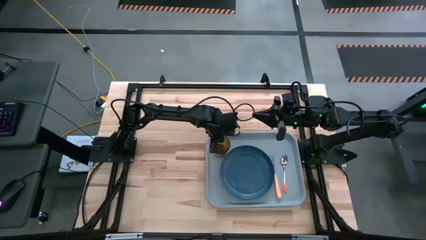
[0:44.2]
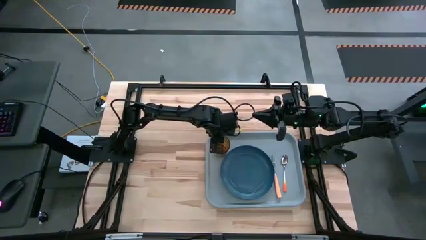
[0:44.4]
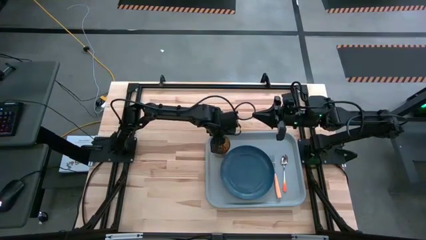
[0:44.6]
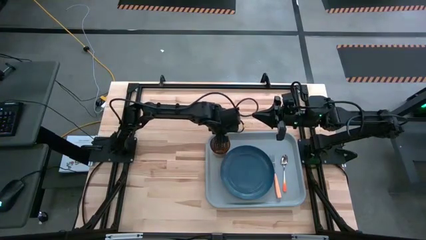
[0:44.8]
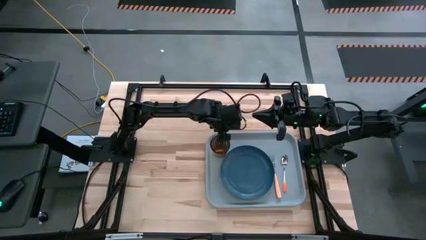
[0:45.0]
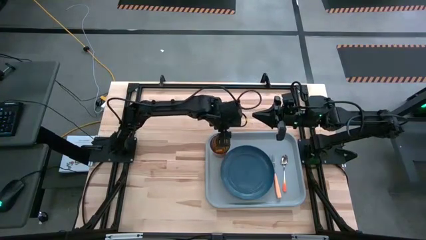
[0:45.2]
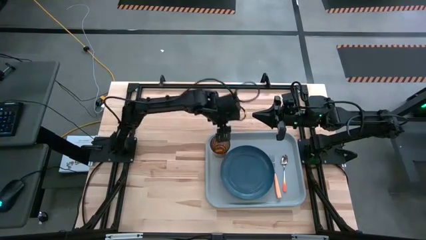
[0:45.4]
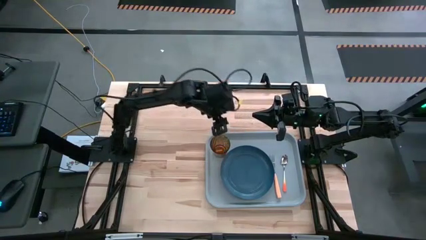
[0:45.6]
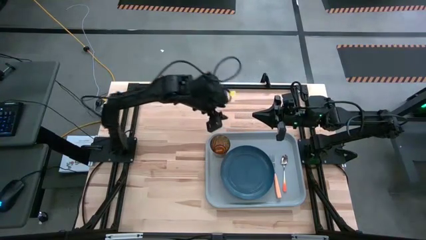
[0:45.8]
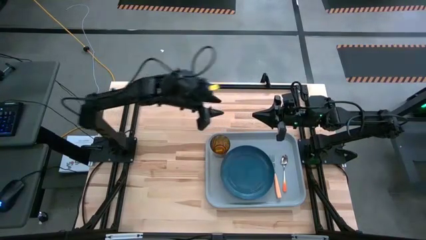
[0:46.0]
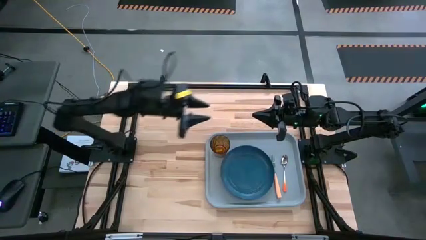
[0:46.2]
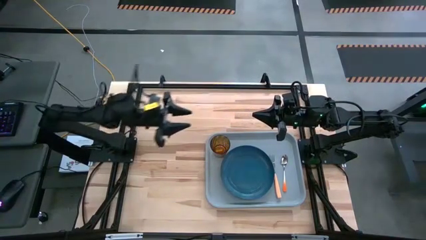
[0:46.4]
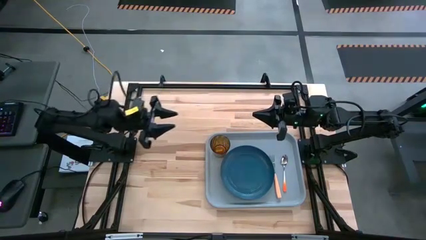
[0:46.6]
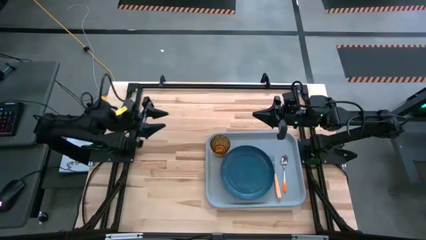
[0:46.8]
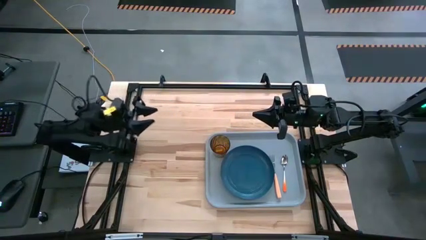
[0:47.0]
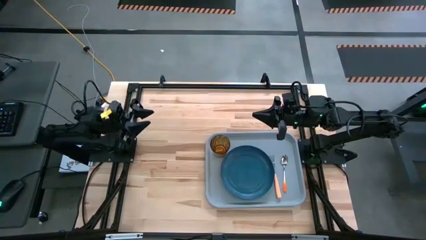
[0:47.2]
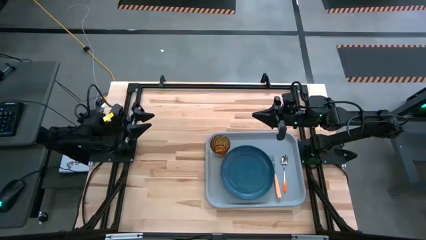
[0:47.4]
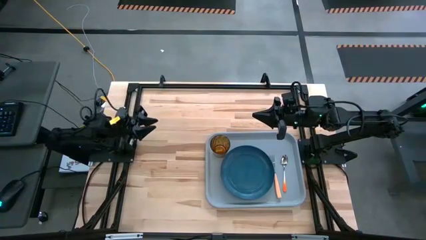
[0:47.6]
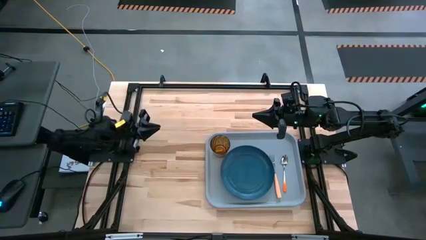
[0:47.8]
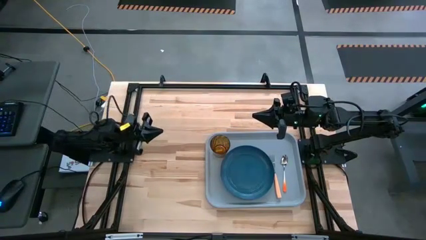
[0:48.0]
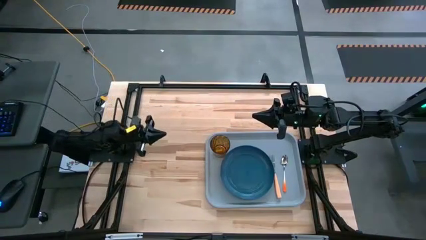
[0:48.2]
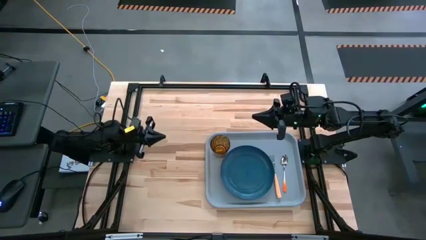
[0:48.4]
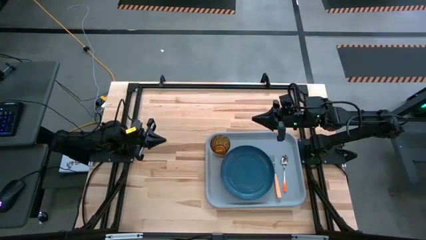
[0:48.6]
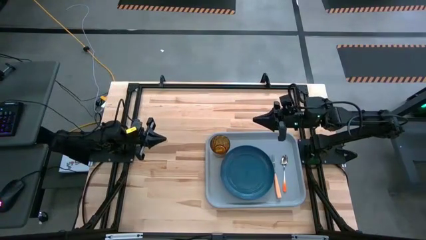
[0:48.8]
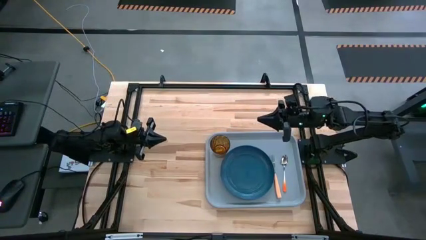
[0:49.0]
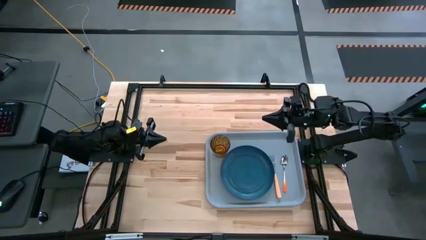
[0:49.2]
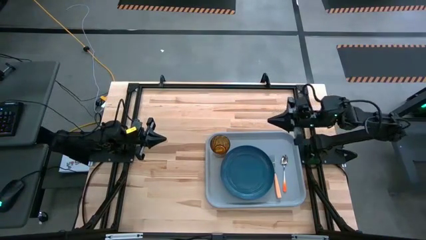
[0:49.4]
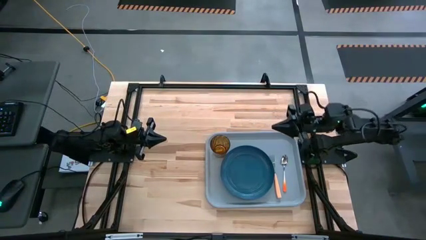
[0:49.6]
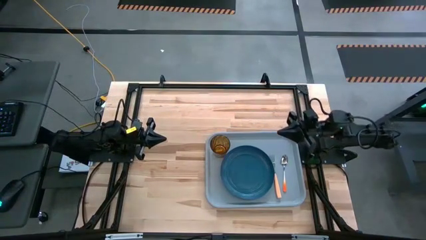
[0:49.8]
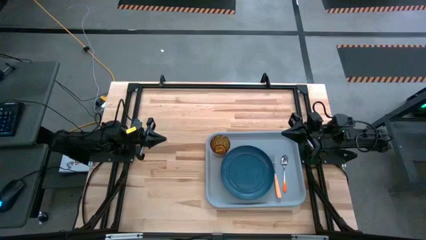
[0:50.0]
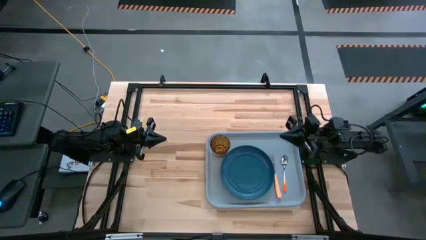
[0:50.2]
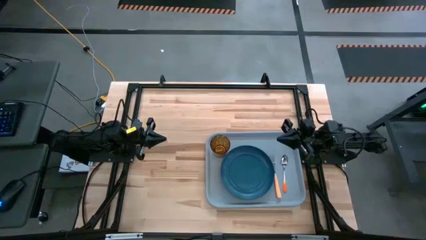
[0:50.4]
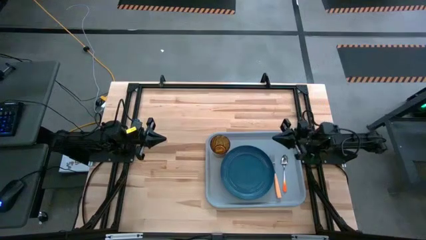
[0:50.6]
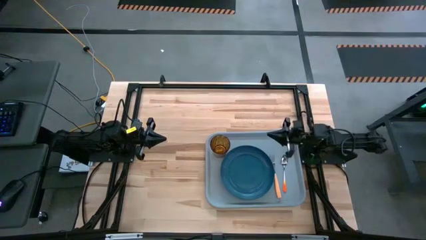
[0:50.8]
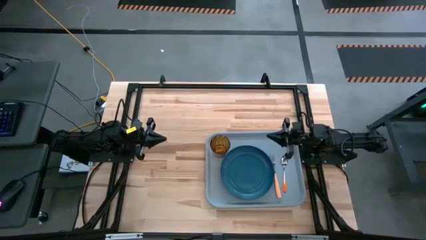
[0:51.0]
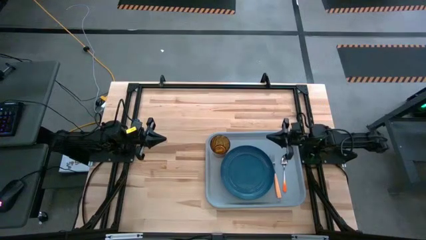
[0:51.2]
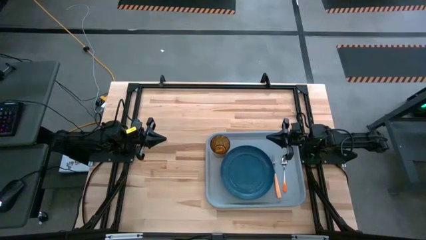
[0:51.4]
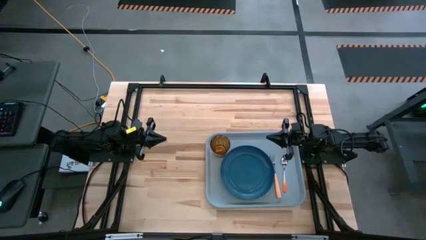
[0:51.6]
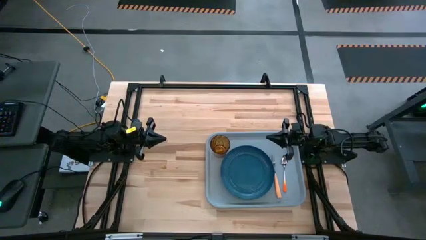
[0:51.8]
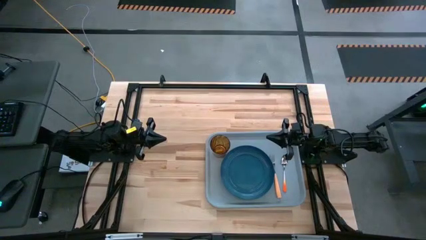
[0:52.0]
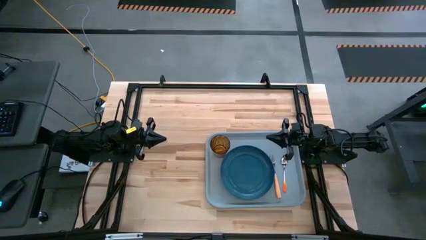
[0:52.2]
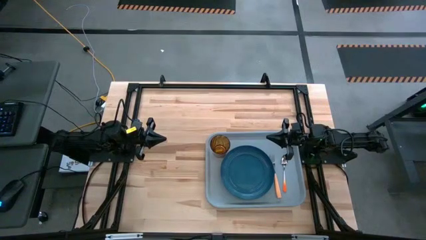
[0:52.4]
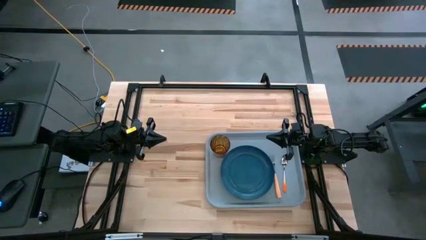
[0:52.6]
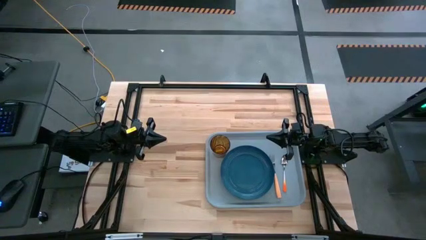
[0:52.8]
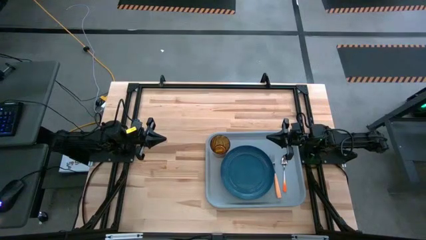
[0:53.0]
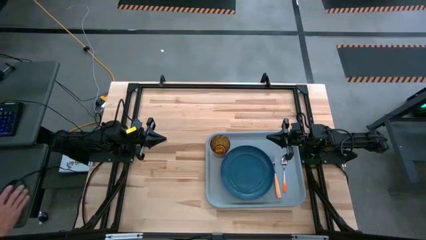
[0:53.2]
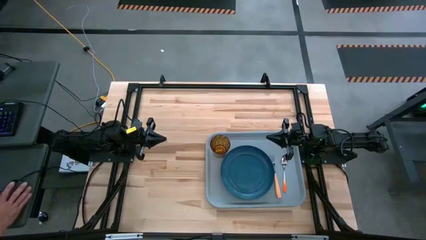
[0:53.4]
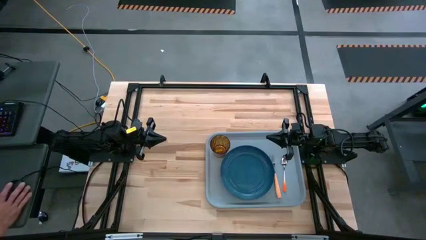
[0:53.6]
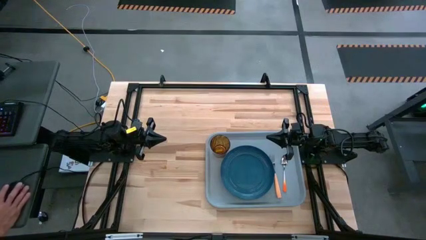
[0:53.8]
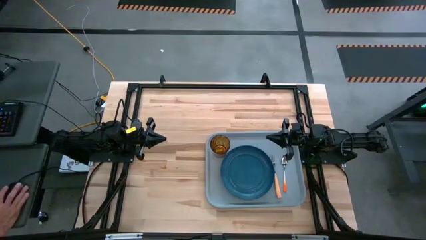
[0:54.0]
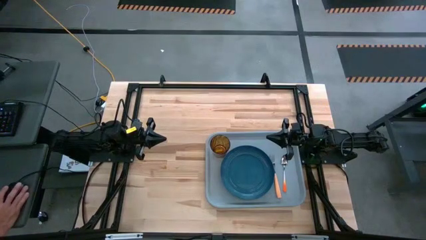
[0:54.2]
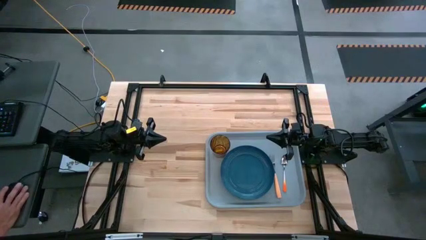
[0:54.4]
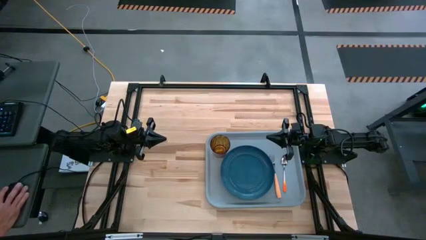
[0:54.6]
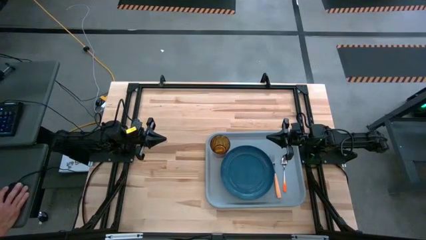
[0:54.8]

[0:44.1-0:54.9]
Task: Pick and place plate/cup/fork/spoon on tray
Return to Home Position
